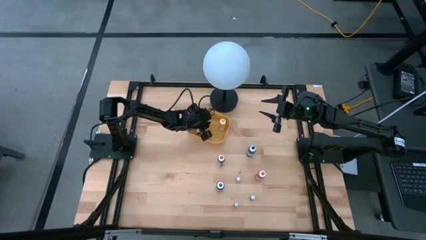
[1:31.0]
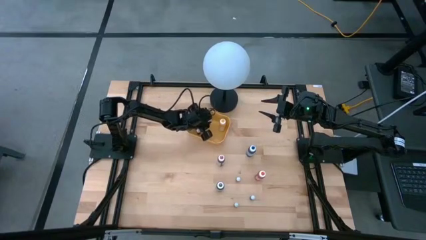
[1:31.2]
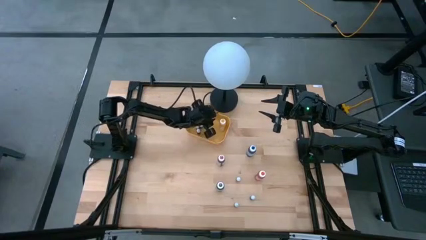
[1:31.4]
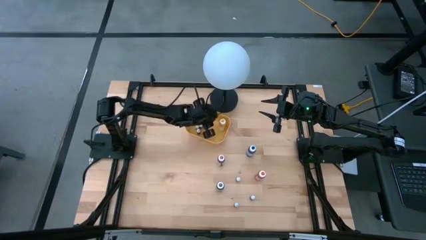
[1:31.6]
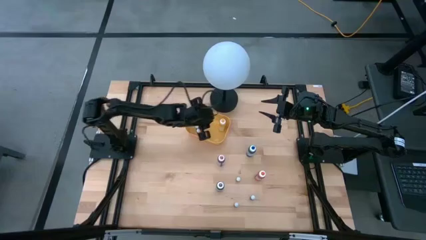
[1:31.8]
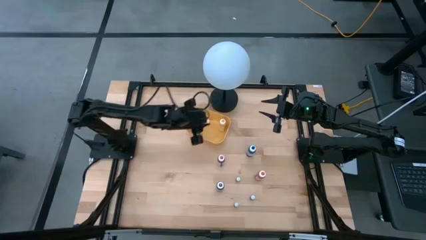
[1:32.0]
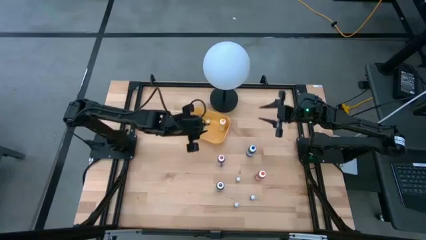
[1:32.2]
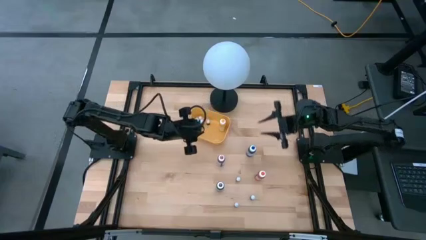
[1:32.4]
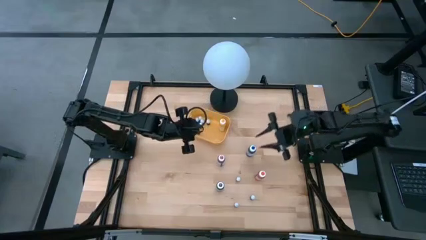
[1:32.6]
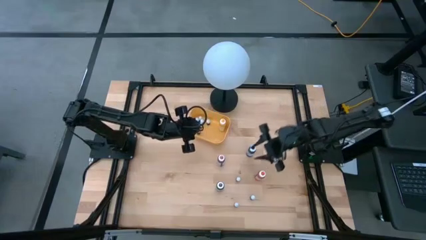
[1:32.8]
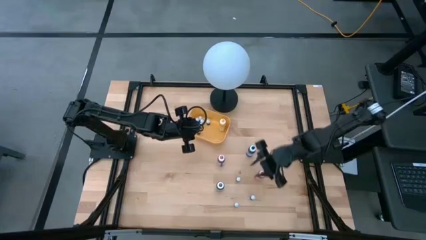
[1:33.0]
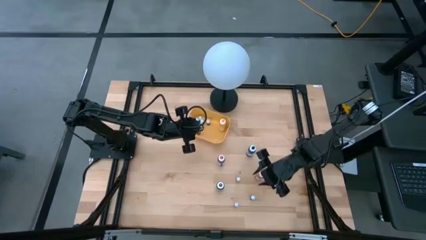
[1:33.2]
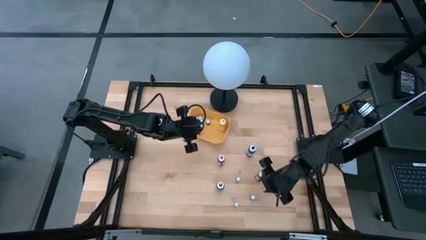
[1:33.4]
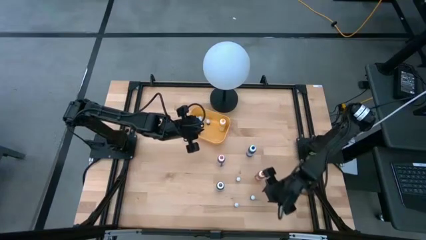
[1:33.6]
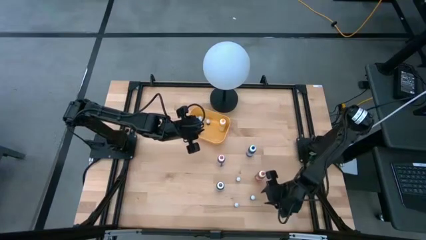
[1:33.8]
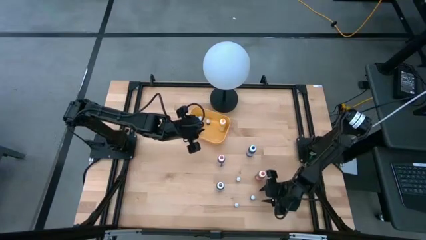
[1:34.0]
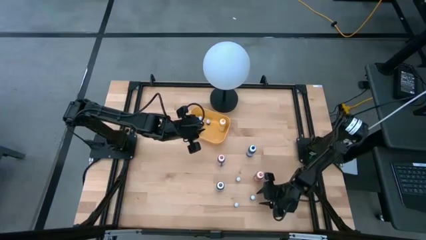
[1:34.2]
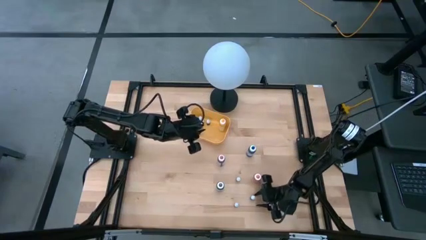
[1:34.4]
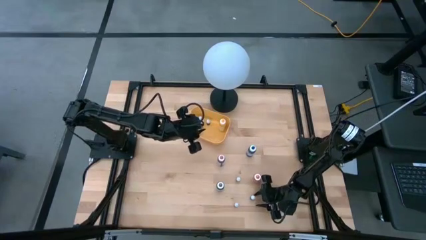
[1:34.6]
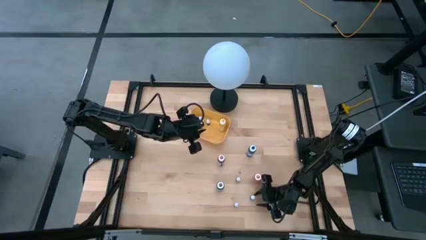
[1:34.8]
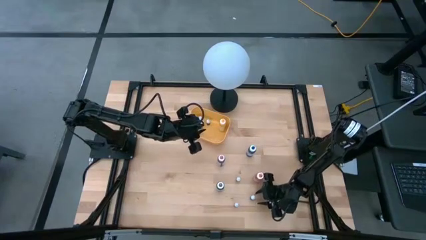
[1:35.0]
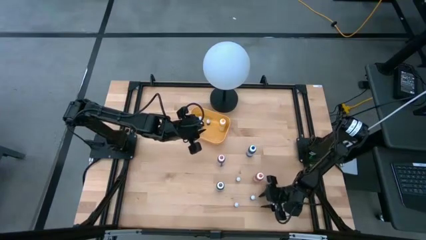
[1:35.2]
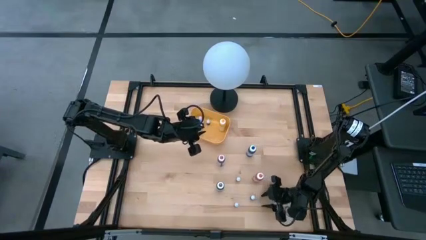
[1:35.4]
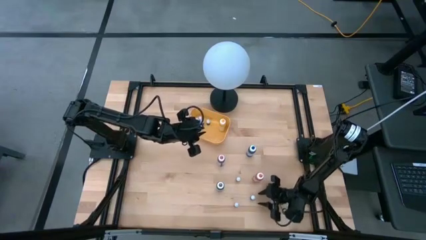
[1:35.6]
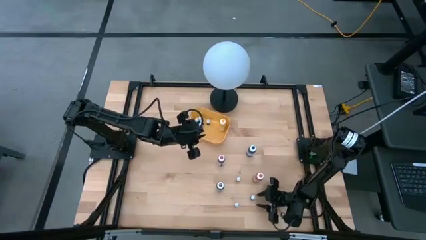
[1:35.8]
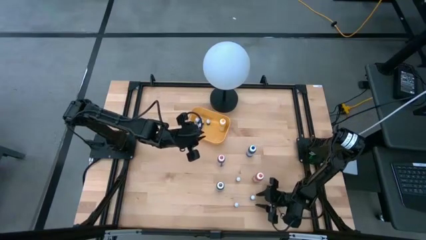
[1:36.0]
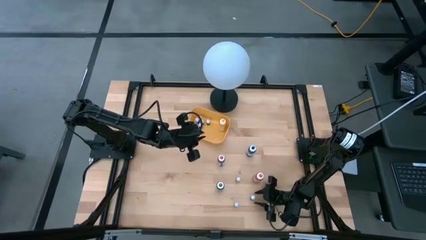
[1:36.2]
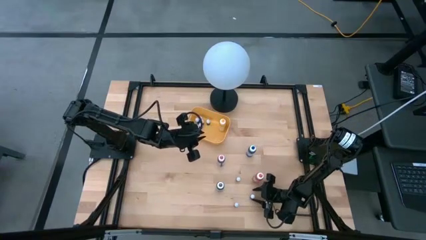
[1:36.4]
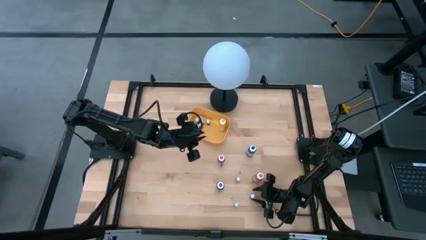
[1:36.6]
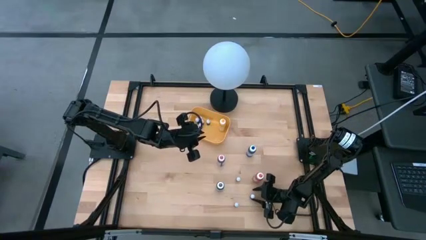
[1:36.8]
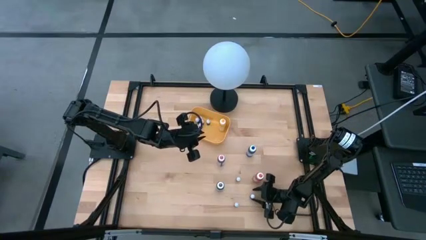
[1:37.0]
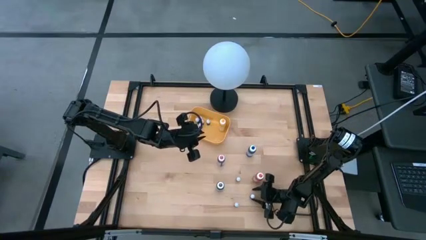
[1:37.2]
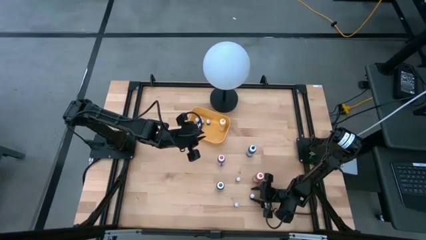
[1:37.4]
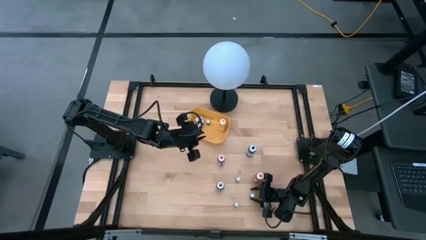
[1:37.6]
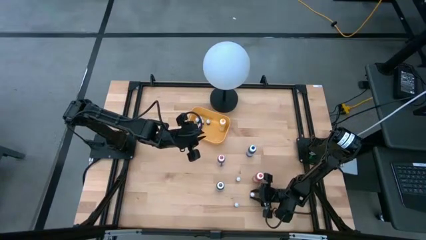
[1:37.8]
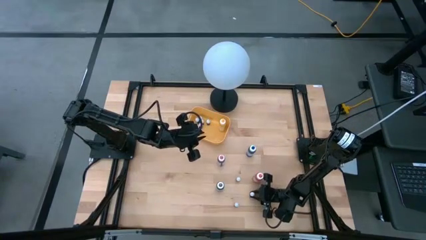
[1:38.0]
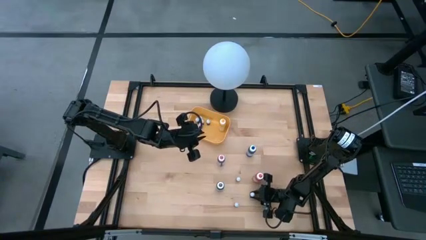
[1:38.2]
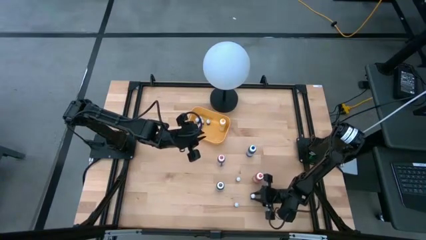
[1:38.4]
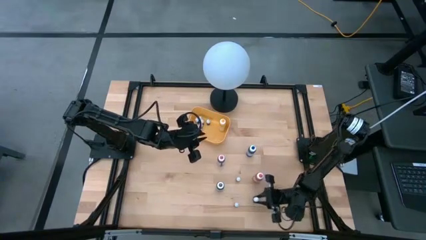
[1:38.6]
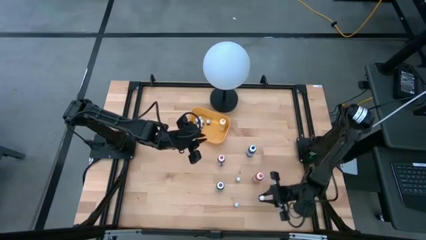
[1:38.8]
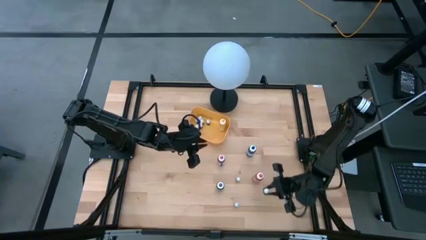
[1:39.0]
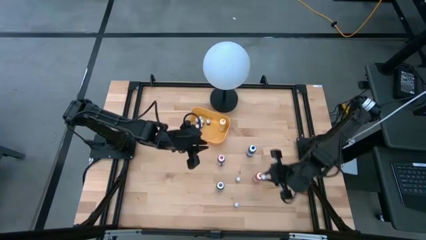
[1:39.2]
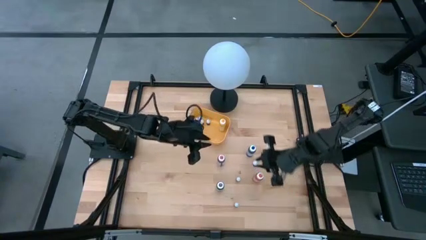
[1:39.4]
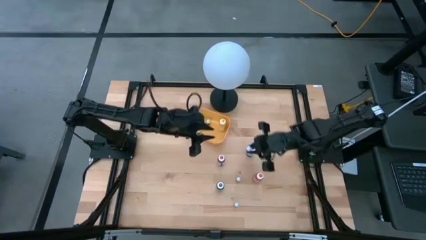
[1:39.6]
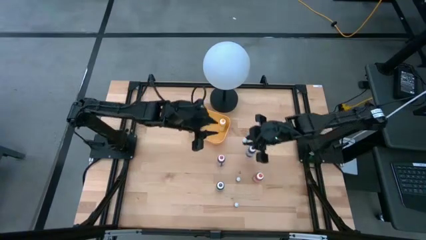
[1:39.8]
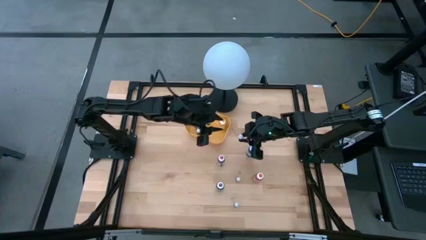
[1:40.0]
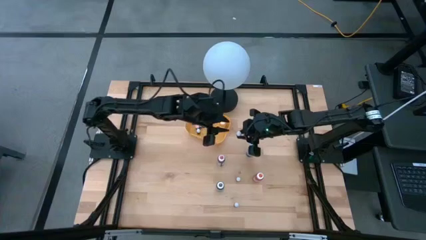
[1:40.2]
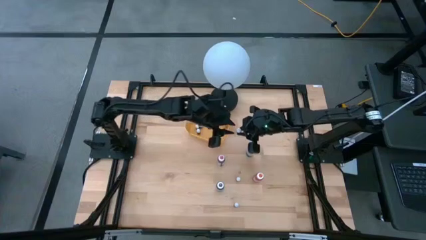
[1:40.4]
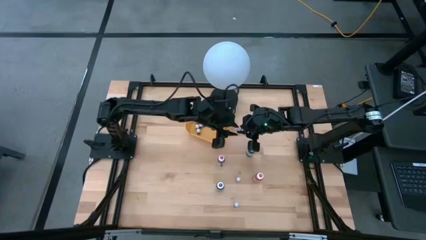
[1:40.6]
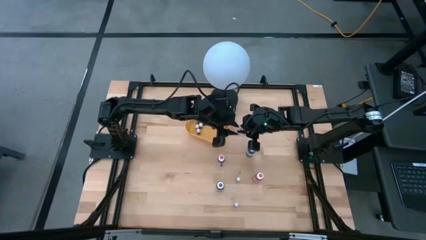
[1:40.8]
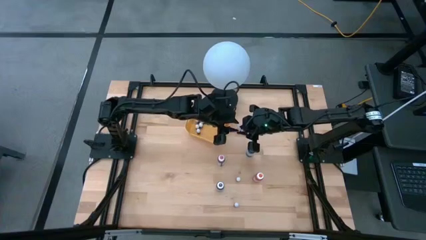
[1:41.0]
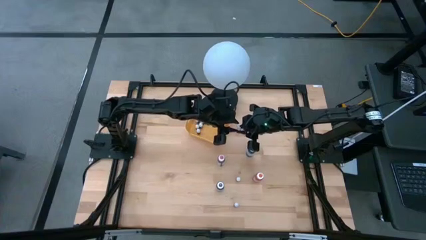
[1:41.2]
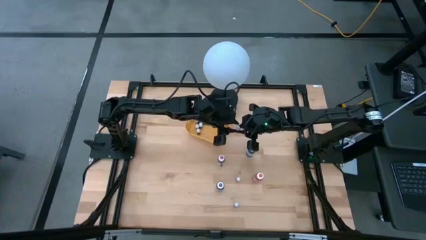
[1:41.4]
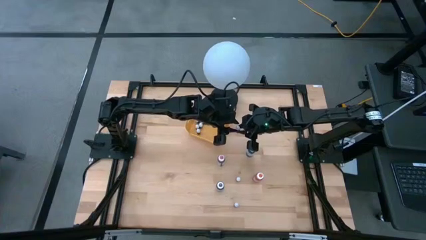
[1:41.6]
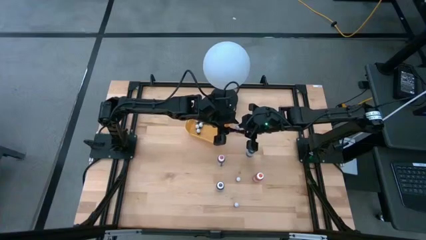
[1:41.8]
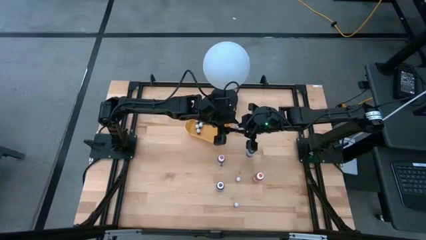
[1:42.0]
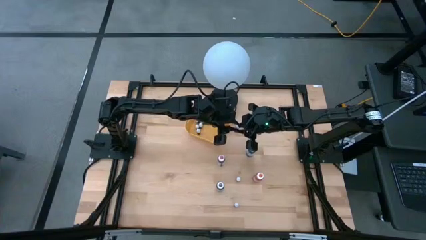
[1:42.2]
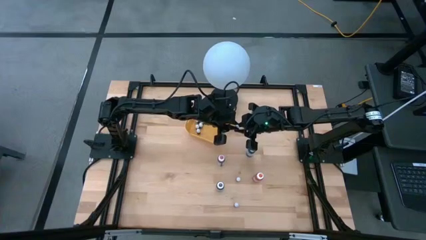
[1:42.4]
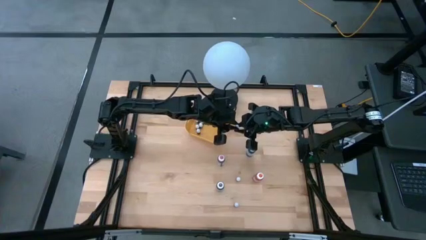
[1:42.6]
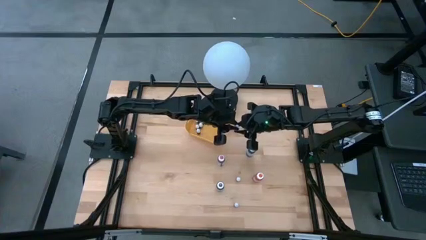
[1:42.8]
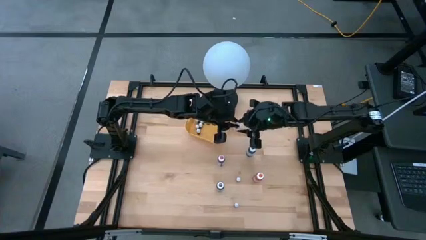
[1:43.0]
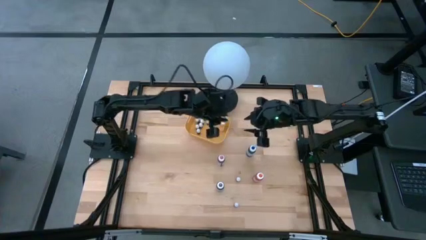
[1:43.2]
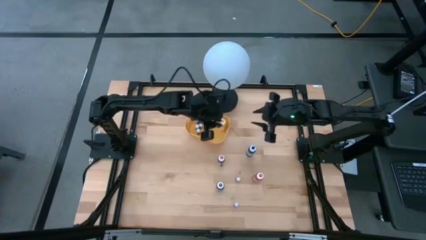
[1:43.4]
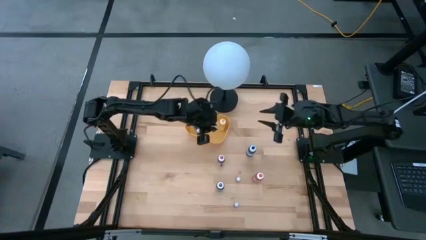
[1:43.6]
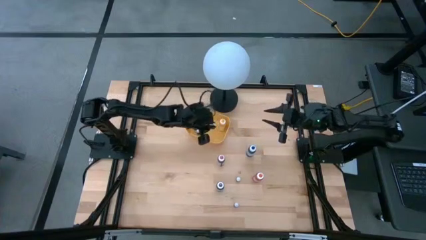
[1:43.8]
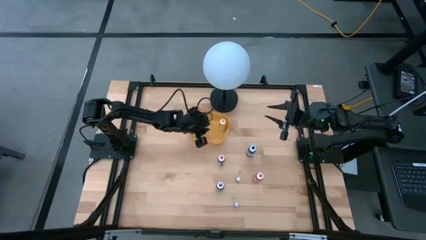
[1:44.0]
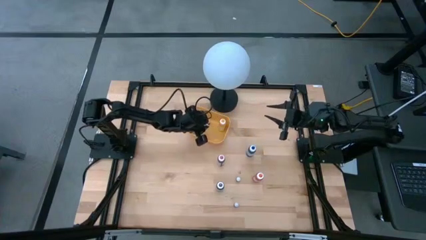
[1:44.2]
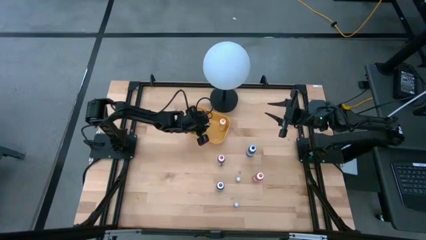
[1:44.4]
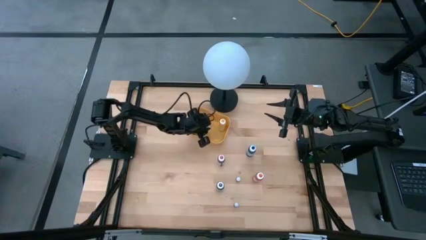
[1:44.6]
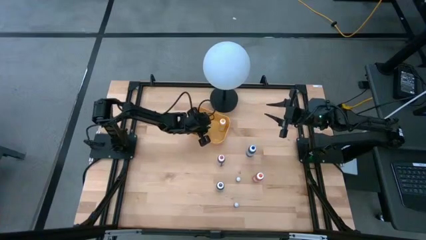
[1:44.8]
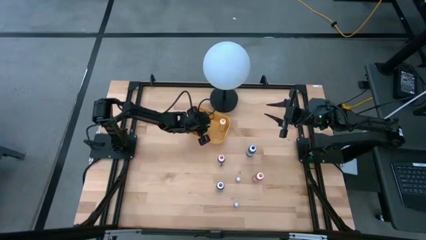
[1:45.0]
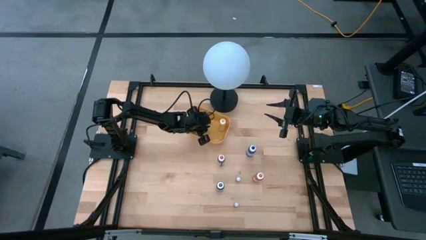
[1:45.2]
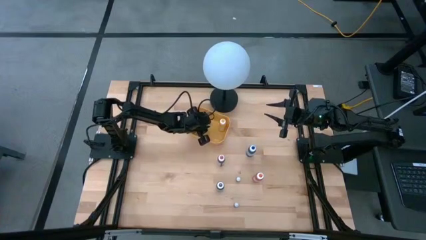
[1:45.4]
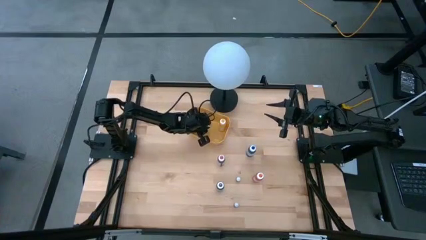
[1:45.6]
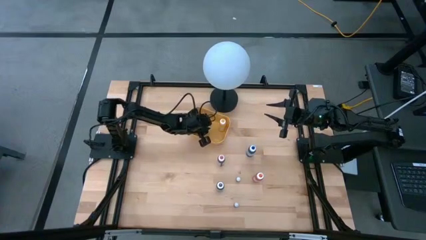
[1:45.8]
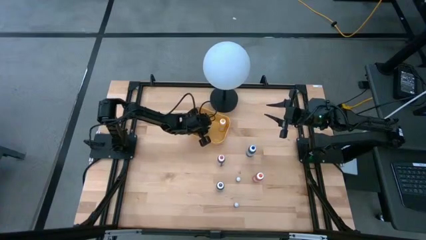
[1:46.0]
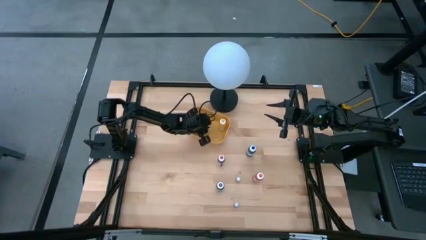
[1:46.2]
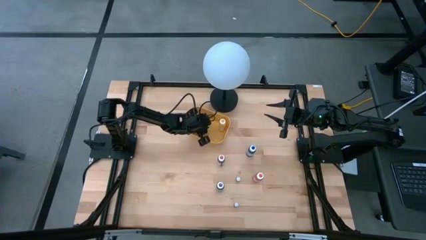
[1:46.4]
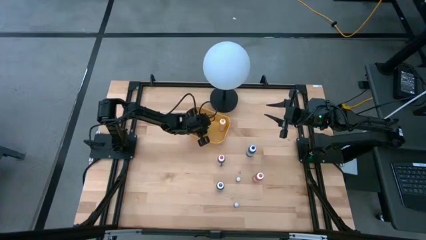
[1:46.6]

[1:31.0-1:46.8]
Task: Pick & Place food coloring
Put the right small red food coloring bottle into the yellow bin
